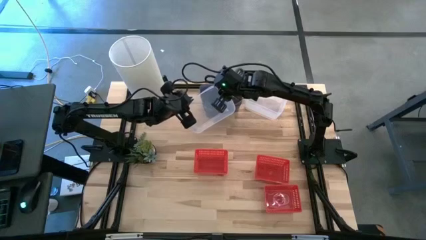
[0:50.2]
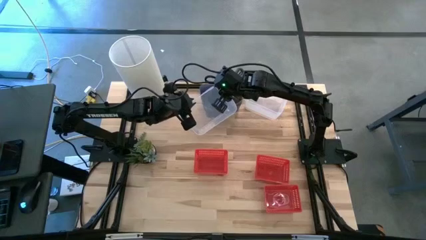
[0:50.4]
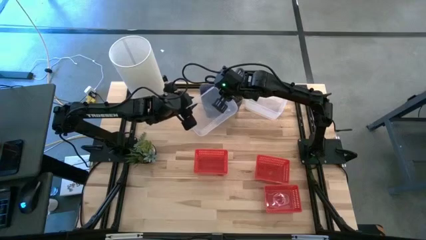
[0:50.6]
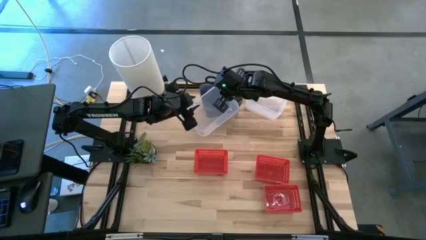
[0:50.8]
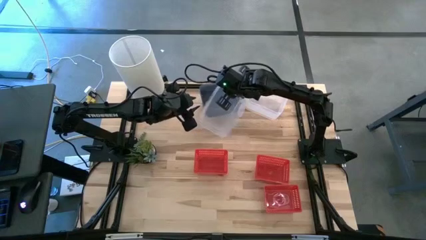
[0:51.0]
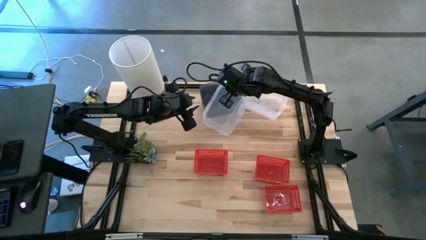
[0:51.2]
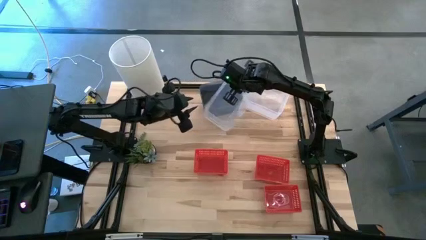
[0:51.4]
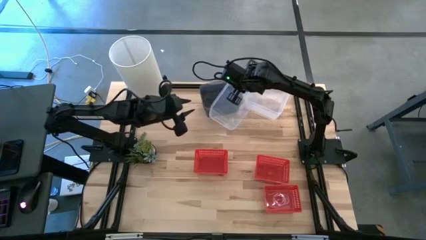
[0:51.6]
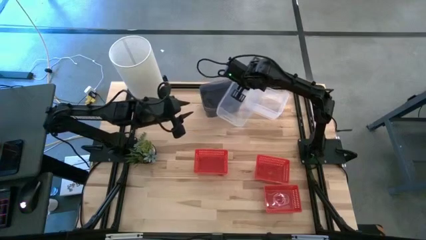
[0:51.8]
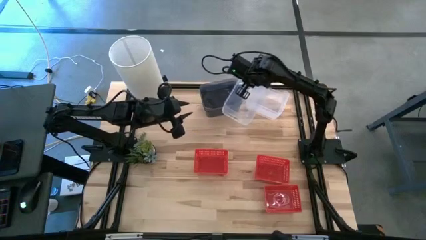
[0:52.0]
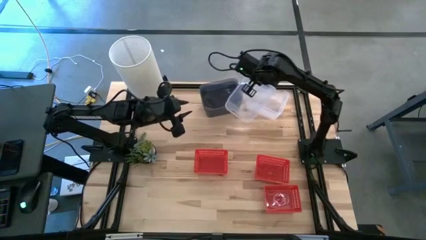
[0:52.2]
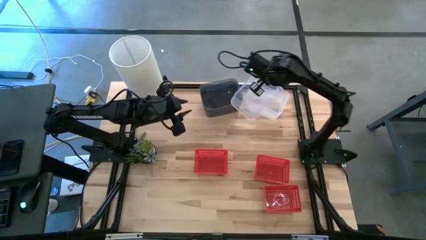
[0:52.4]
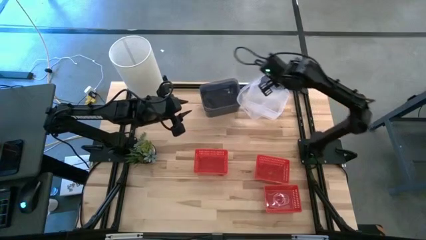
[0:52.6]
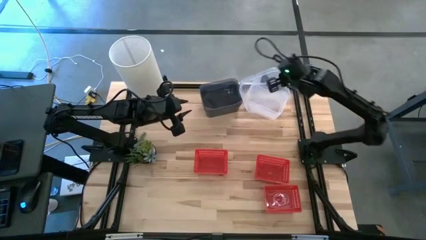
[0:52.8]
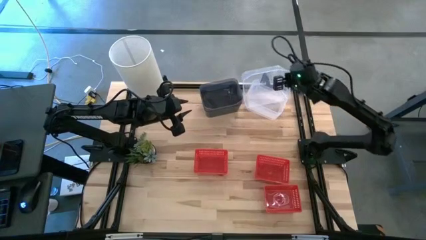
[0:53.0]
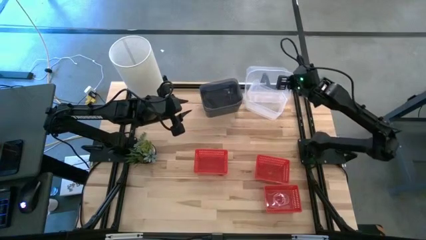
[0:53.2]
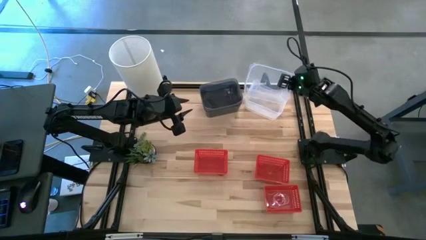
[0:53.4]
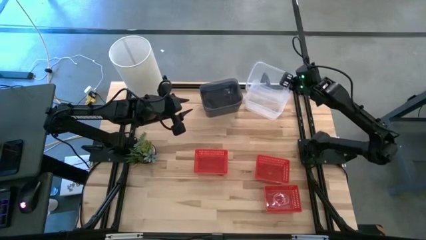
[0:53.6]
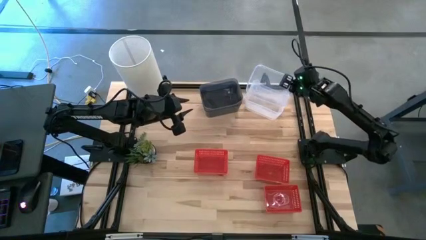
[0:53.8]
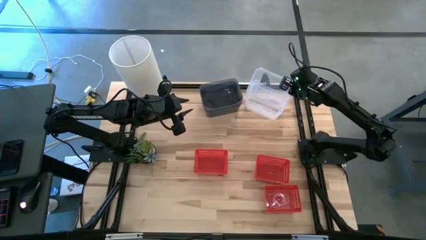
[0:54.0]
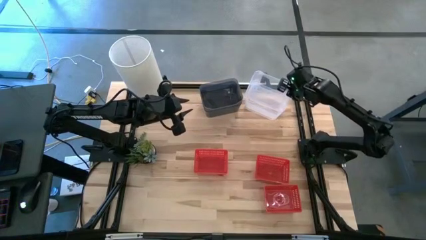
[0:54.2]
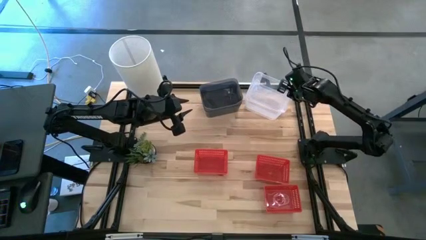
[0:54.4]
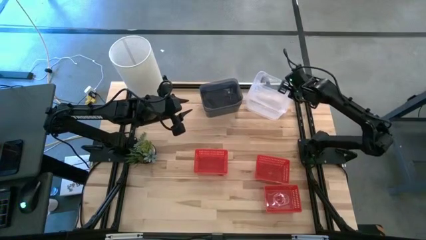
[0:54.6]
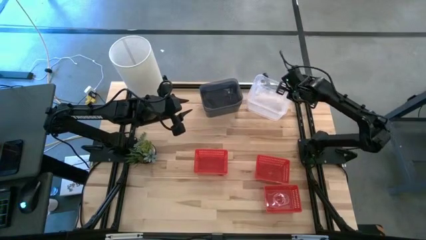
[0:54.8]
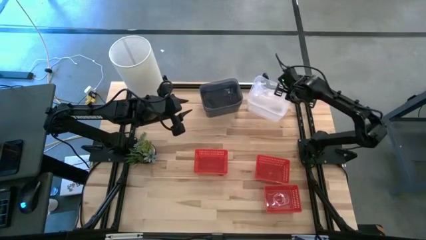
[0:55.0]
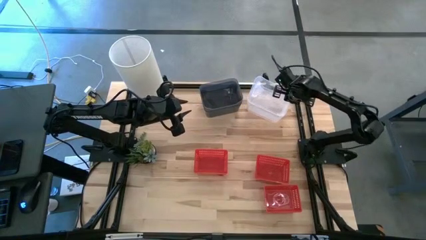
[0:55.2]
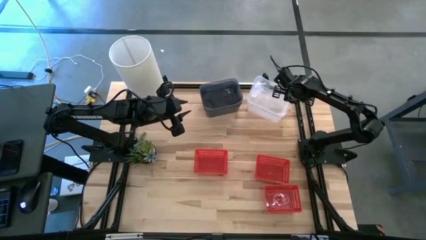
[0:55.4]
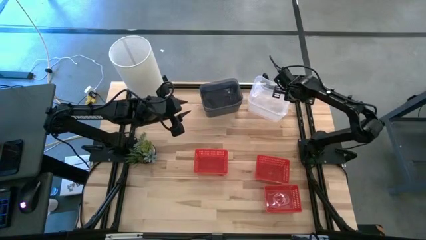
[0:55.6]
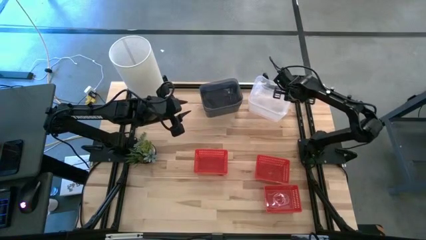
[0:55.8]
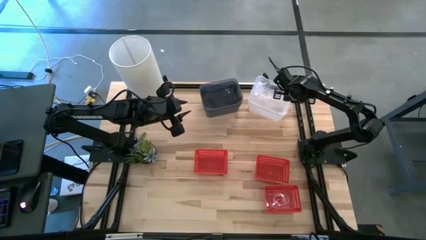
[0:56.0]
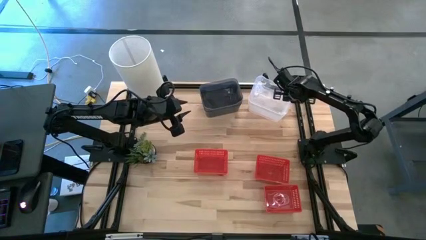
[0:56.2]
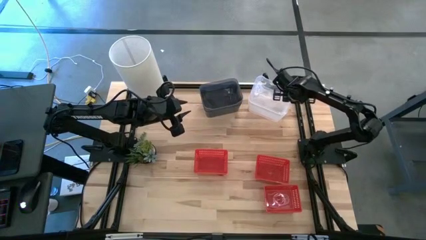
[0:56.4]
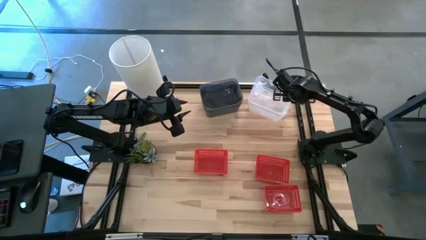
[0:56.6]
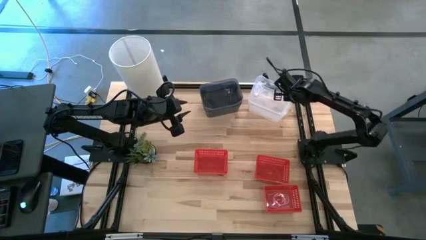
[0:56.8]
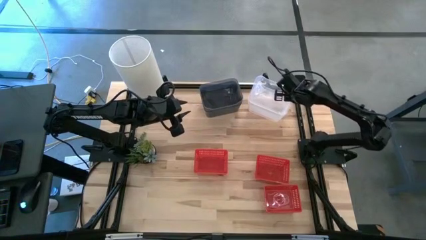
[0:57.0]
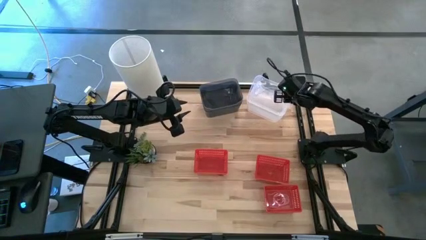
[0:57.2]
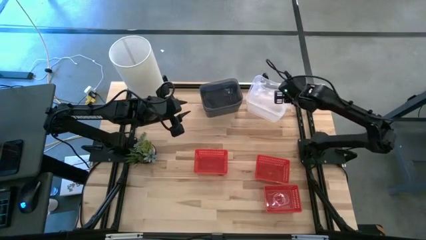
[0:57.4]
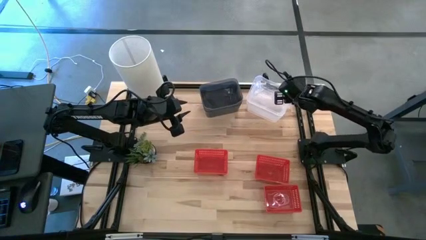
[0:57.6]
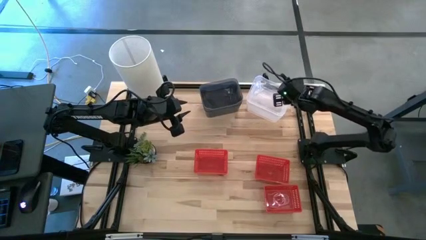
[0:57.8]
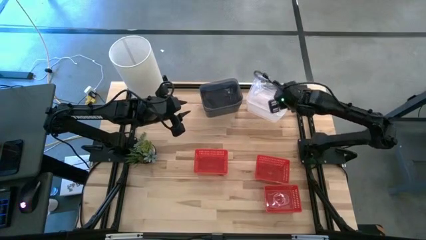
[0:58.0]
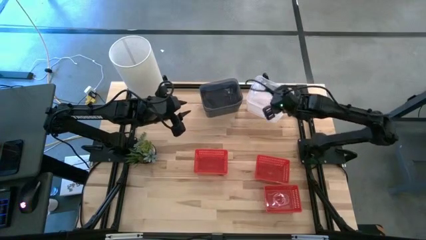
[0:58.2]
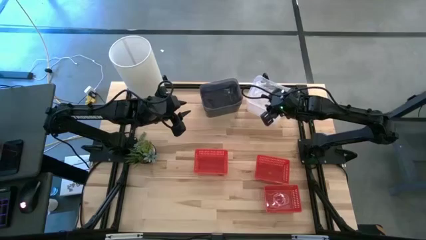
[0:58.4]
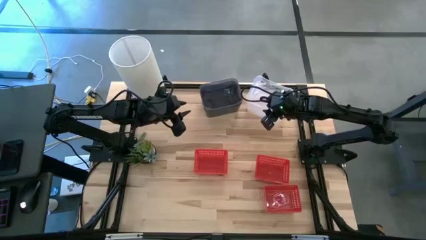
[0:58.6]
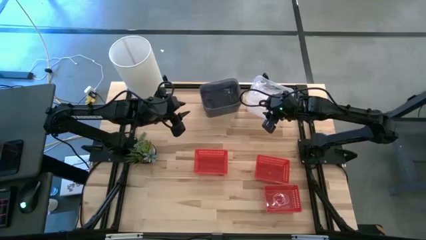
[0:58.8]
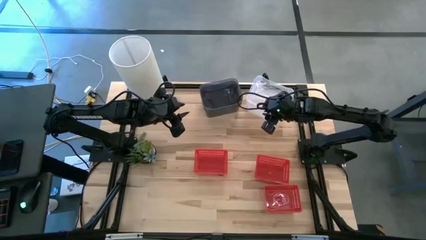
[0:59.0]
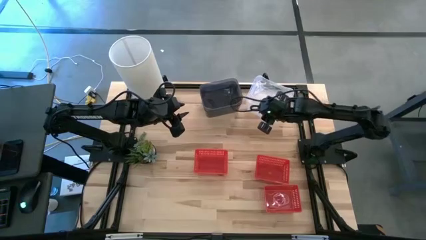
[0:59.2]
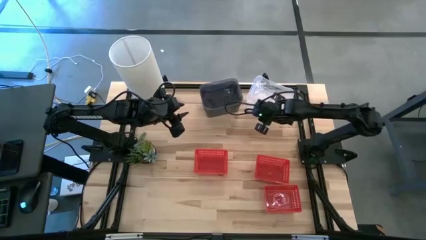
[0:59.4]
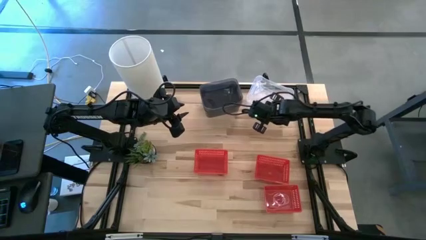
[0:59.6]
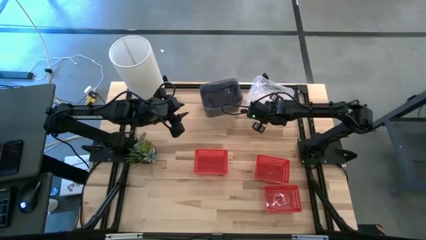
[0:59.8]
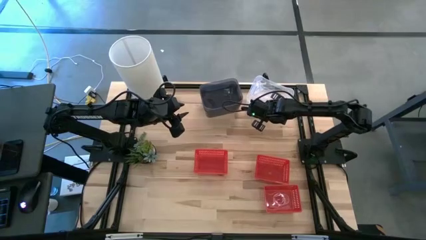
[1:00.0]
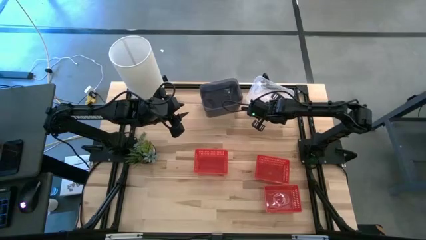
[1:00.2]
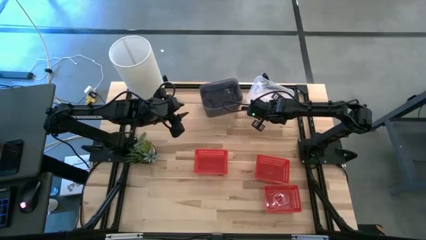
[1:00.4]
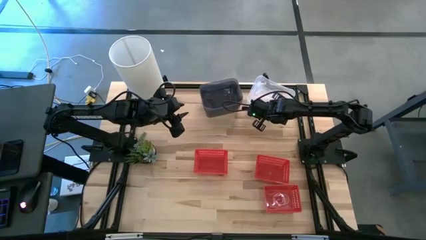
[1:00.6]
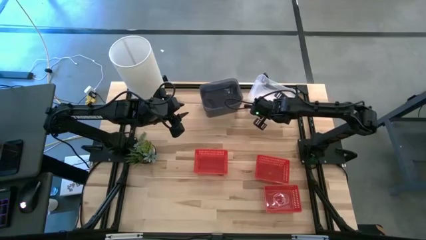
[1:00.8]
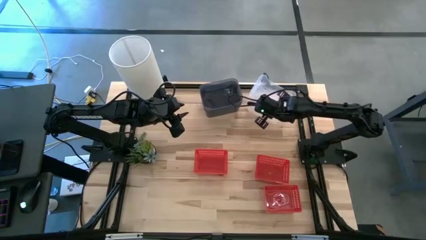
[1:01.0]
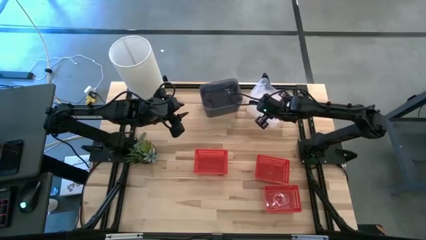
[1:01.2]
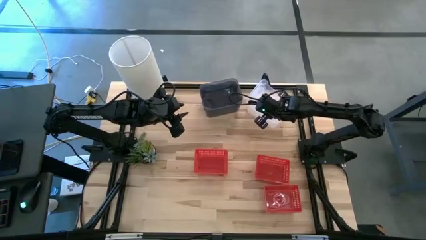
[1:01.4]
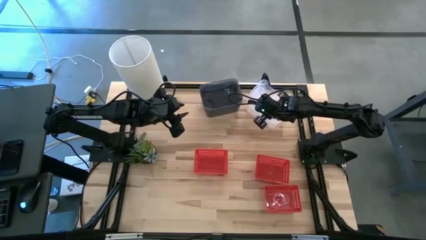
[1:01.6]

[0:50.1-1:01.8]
Stack the bottom transparent bin on the stacked transparent bins
